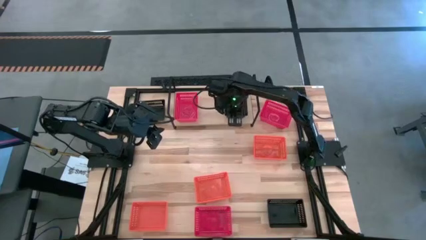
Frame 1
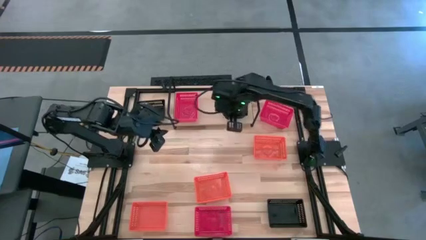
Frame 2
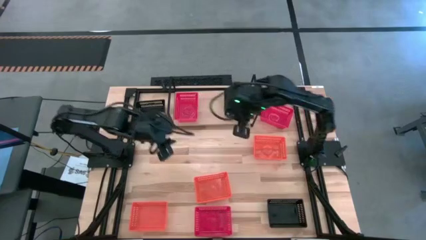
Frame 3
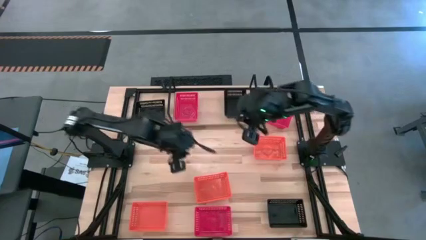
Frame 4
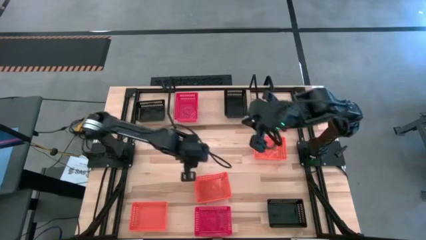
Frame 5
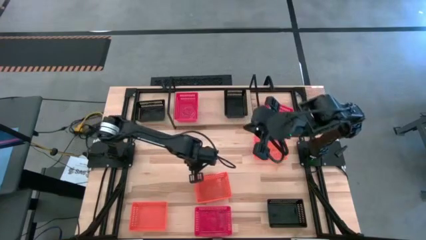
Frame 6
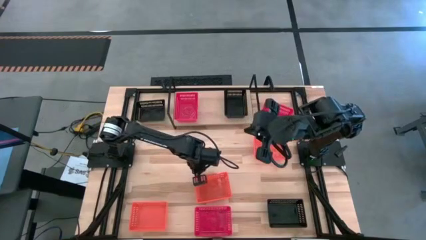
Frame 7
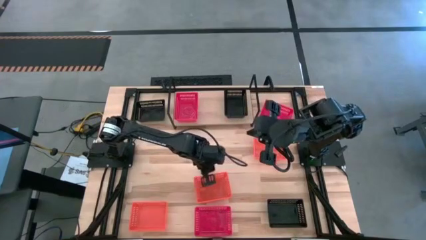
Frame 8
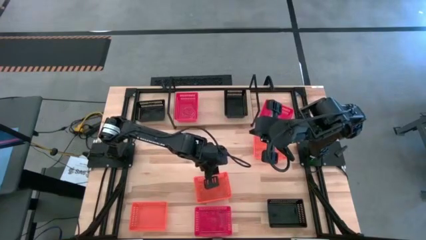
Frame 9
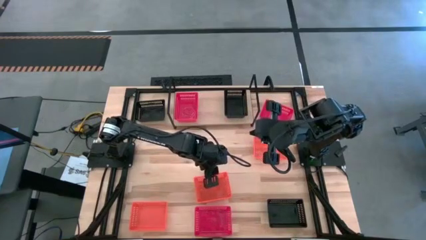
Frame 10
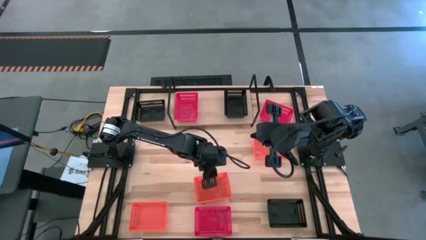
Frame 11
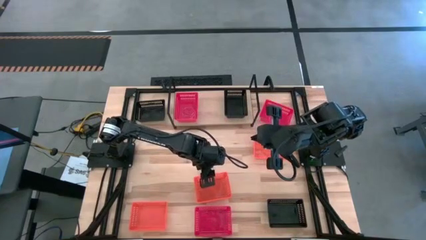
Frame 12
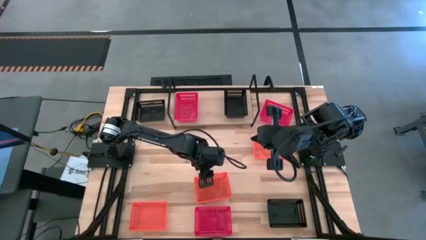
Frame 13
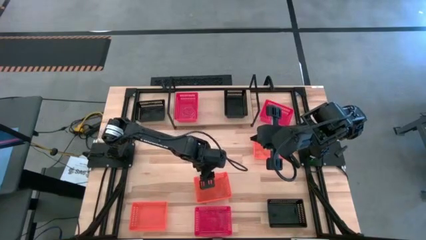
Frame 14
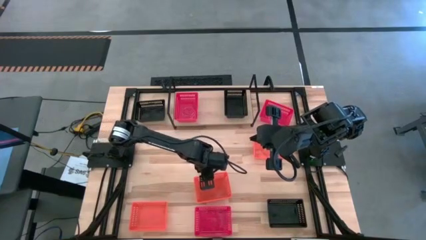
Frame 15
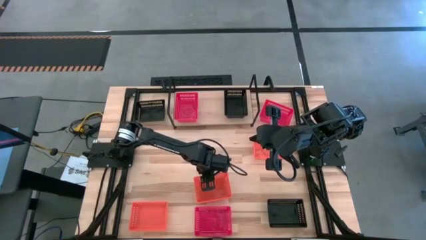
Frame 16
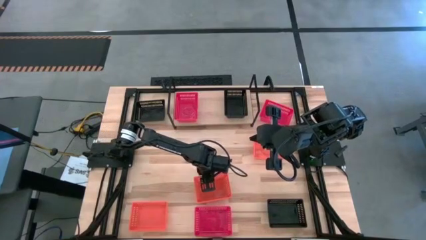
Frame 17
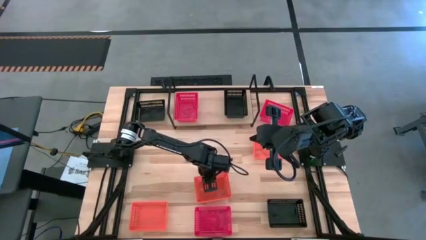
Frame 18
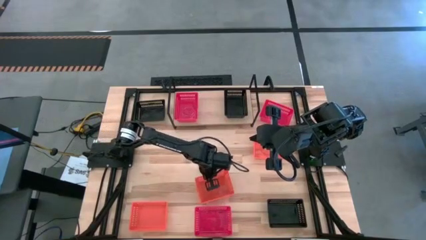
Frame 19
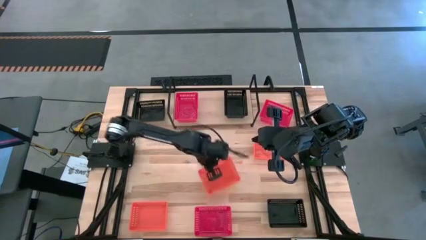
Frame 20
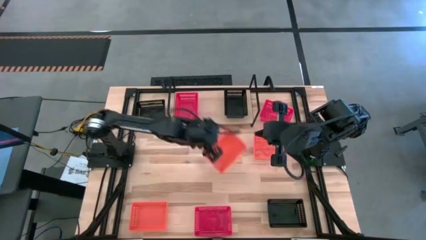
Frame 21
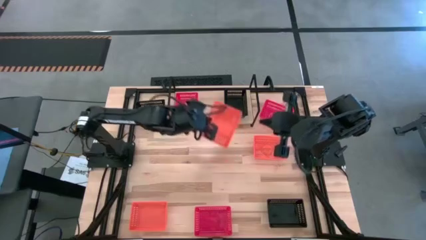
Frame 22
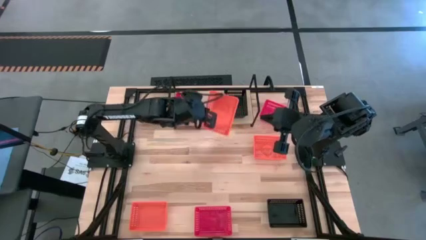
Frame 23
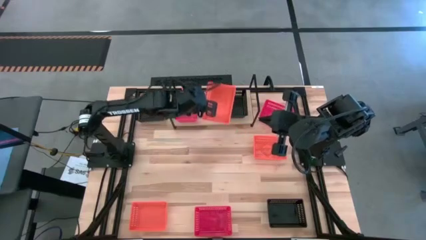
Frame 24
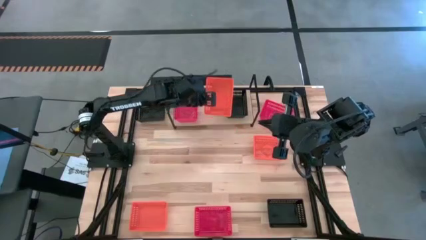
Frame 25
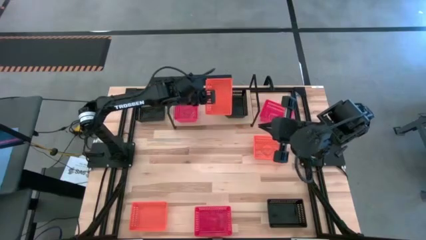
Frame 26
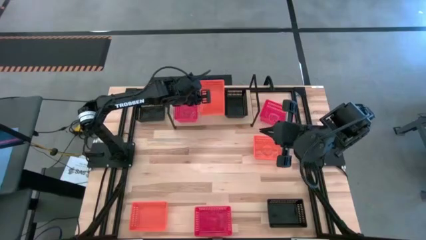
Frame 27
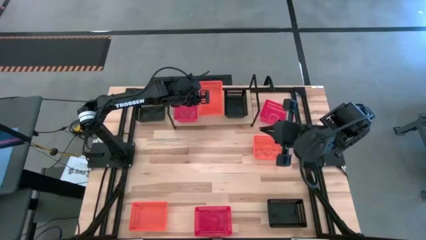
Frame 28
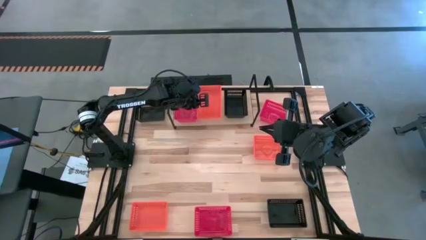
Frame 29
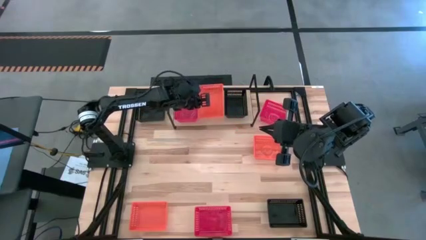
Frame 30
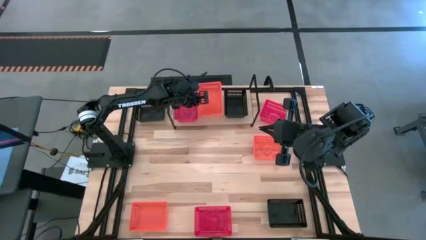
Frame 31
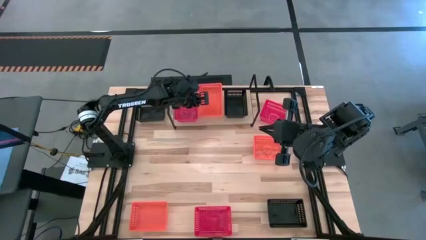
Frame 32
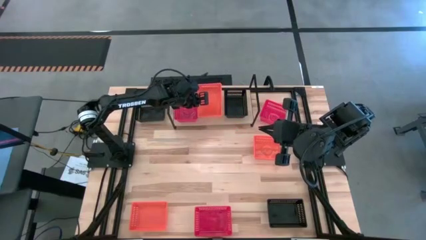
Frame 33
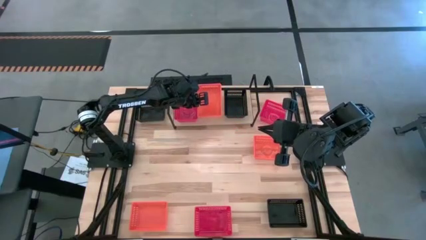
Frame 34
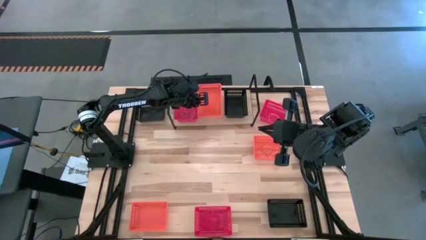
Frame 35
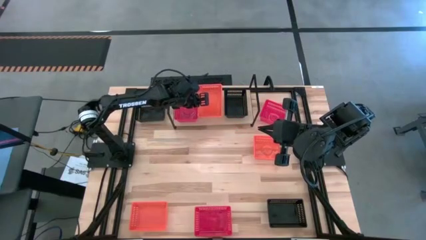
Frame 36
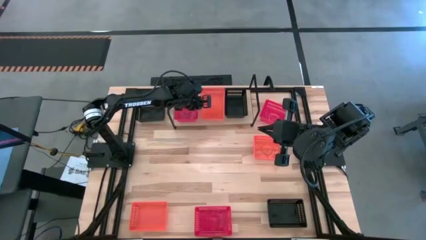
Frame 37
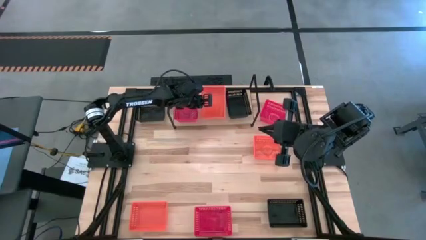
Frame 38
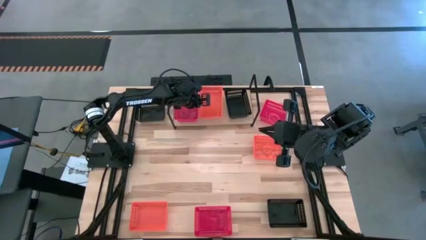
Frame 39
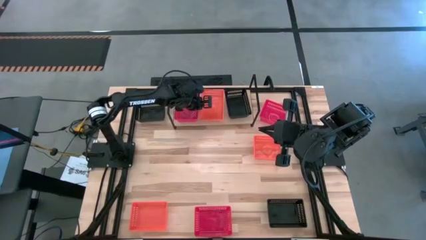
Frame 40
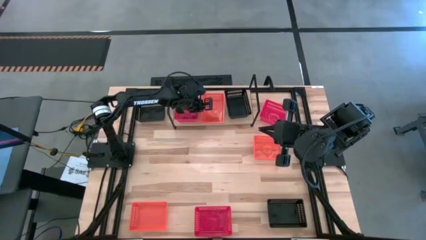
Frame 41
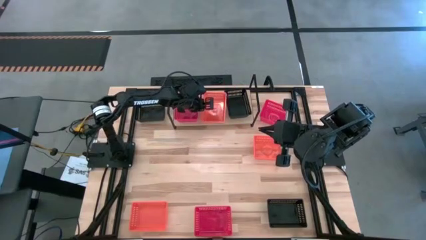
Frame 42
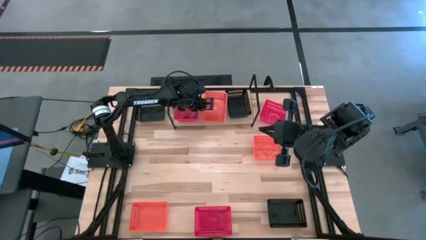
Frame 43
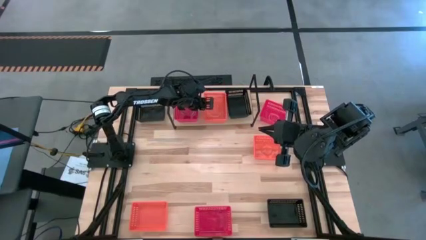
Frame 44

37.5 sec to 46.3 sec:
Task: Stack baskets on shelf by color
Put the middle orange bin on the shelf

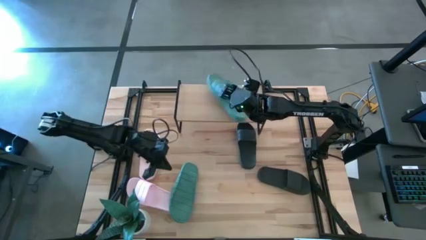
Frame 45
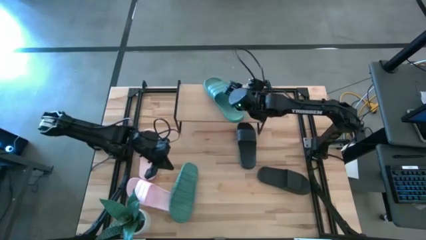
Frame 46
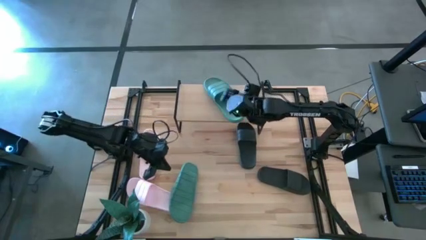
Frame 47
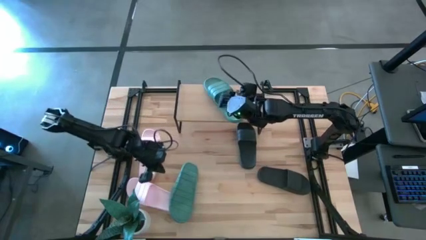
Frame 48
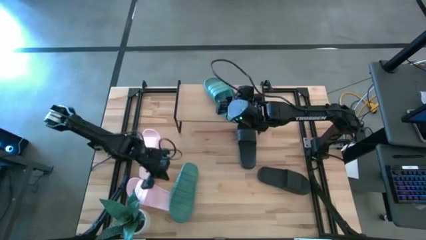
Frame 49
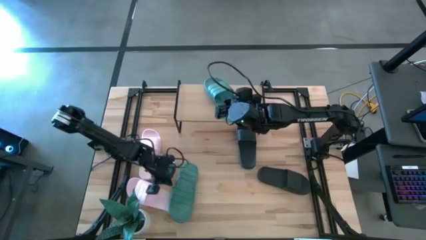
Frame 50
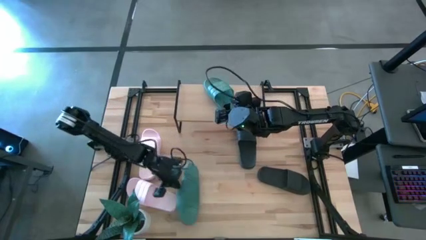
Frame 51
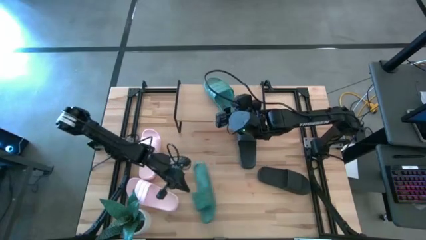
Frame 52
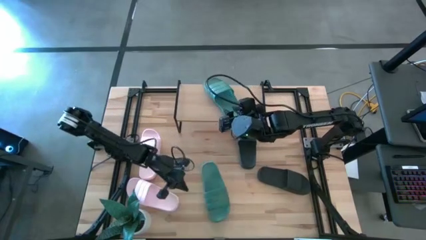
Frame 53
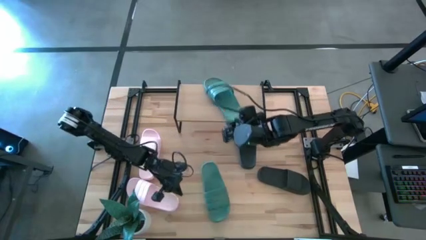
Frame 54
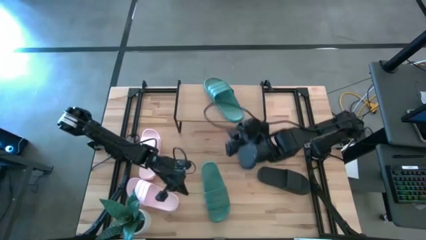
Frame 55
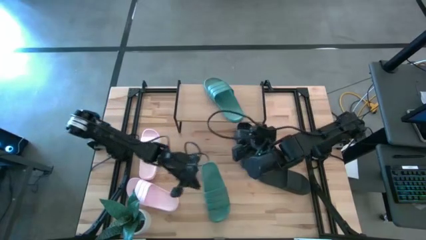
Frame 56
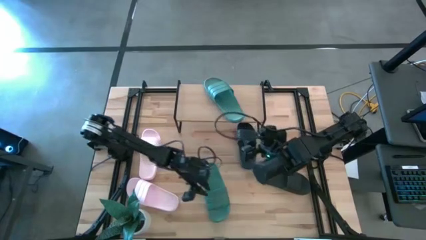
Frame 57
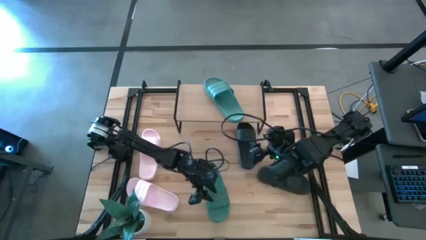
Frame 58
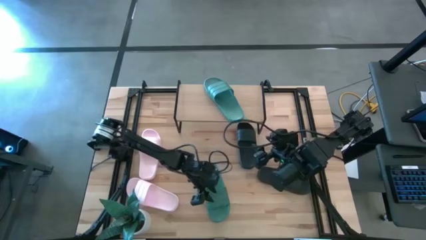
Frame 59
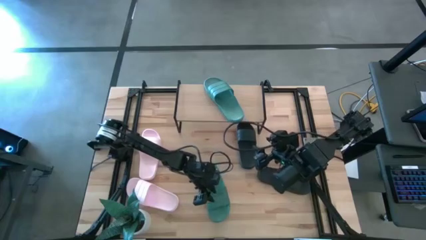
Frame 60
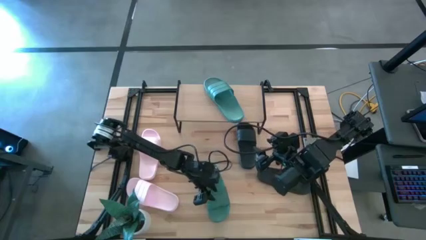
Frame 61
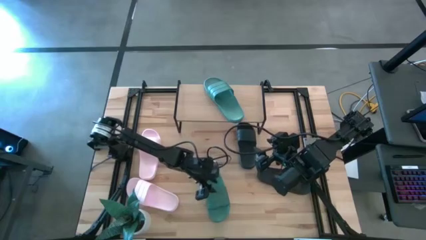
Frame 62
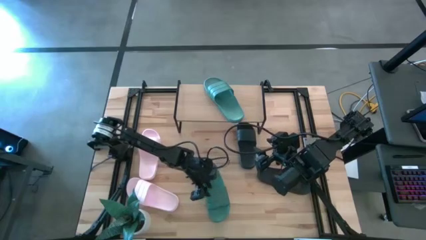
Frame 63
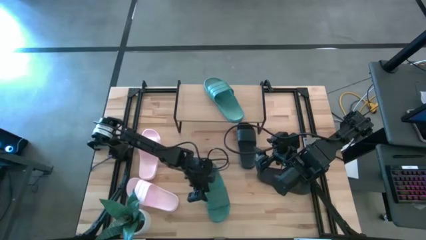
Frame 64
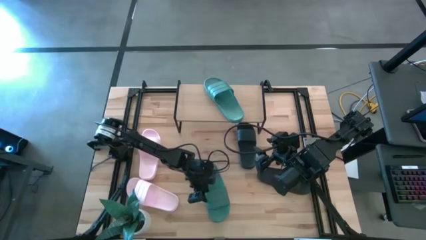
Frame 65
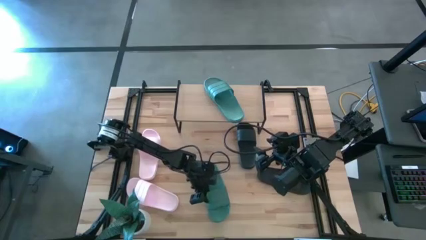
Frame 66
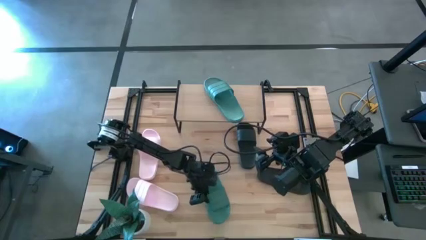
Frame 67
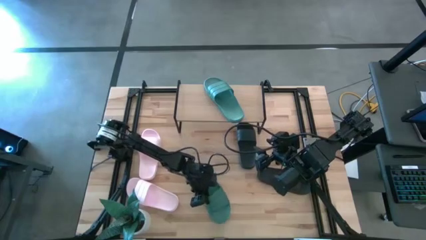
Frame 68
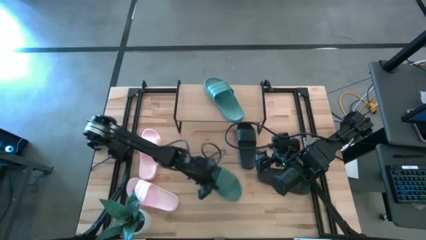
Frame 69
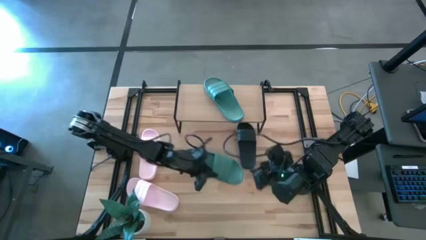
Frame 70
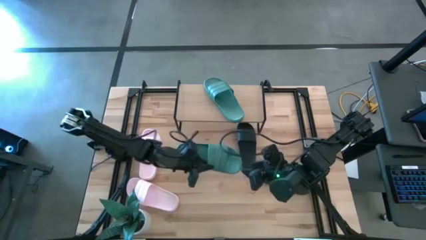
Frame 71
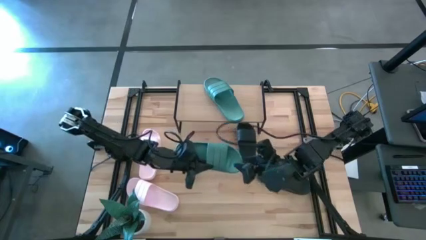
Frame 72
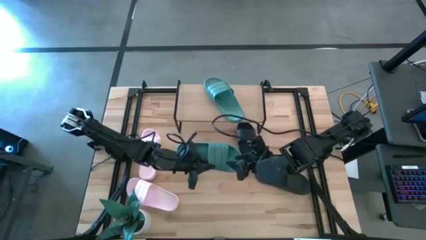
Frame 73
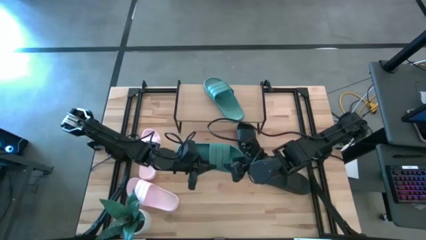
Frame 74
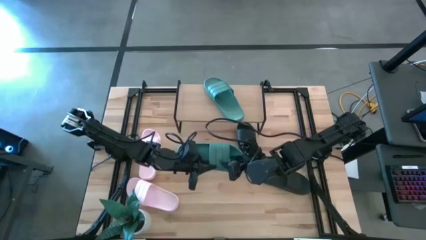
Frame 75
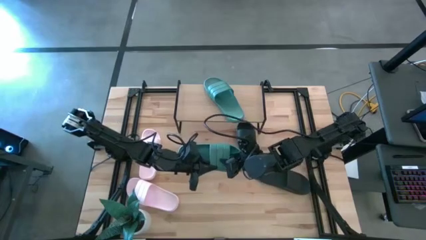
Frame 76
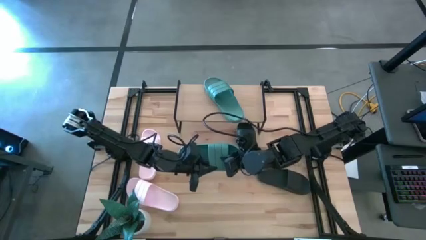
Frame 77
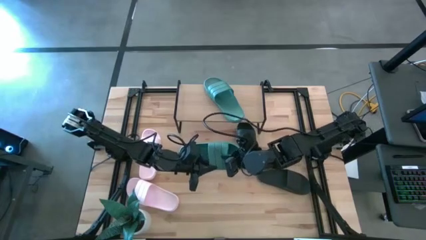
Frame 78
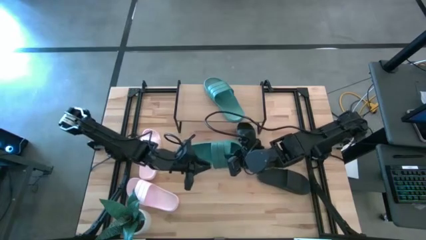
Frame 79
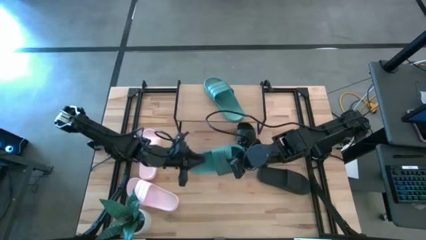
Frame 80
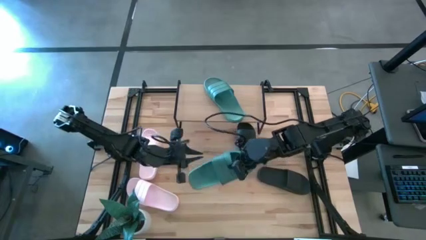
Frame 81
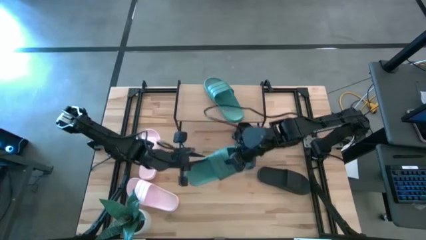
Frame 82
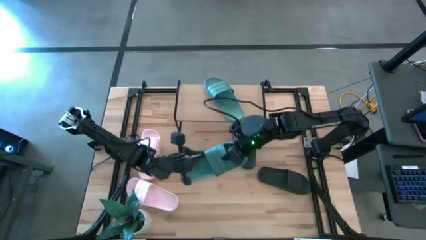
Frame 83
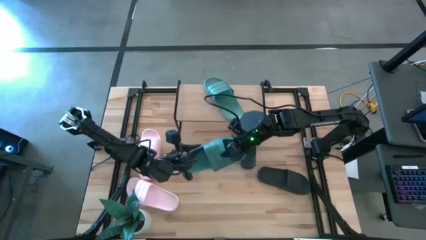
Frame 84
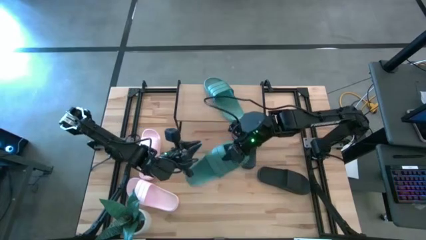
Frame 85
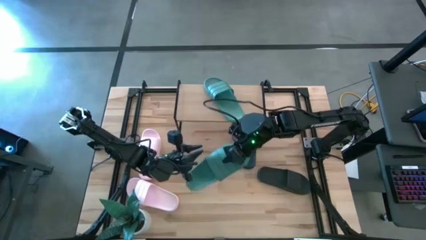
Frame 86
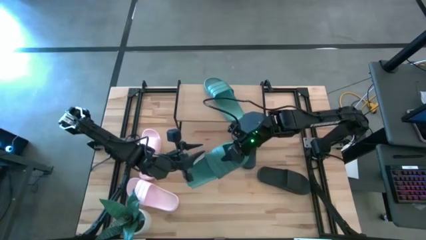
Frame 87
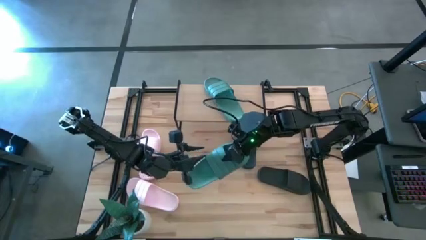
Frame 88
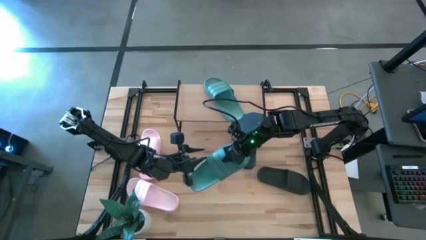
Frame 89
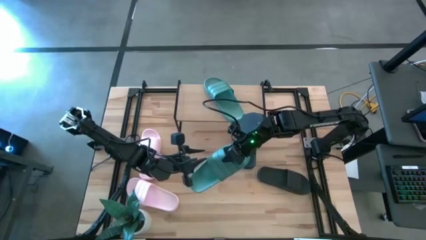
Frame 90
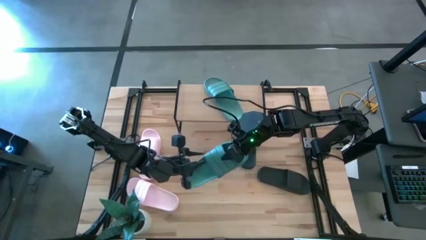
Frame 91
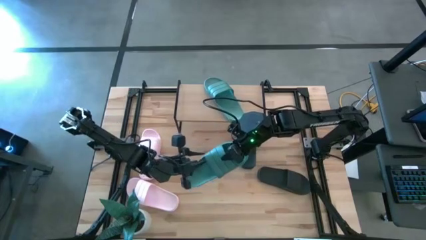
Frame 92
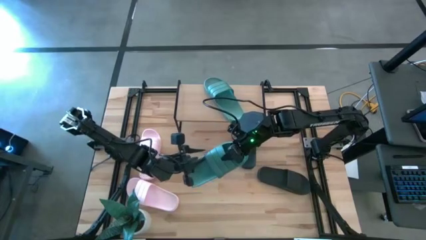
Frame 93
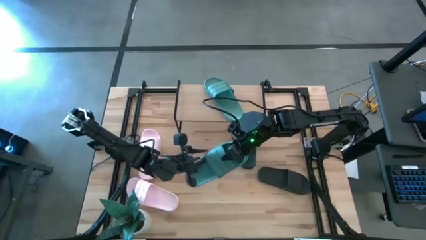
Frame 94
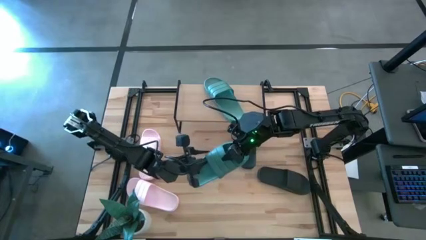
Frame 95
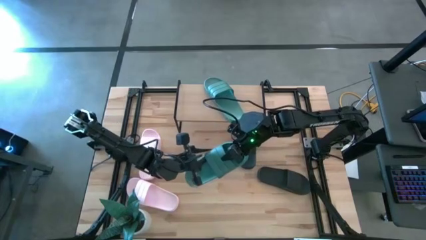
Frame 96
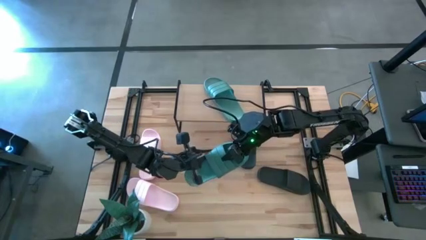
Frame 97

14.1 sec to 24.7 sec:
Task: Pick and place slides into the shelf
Put the green slides on the shelf
